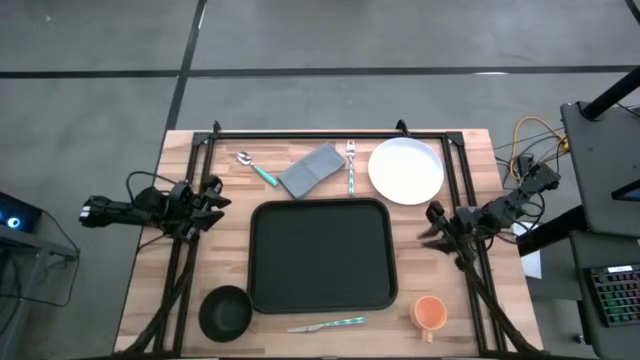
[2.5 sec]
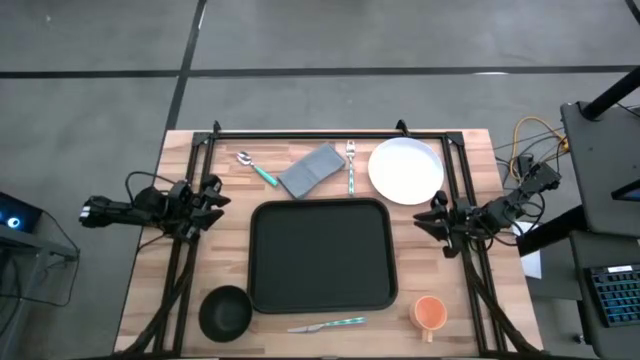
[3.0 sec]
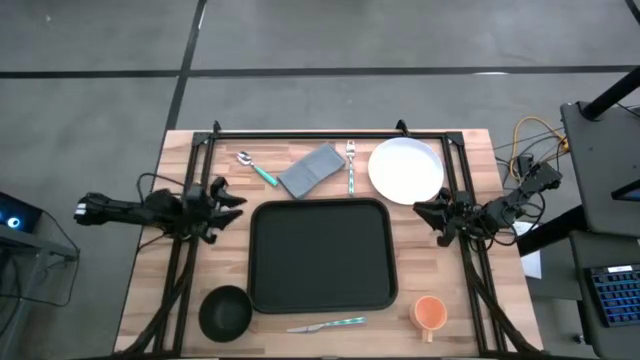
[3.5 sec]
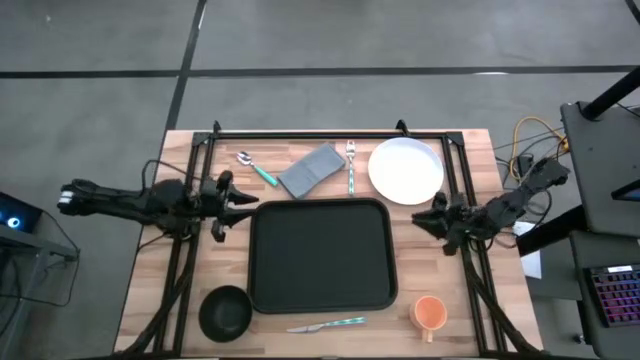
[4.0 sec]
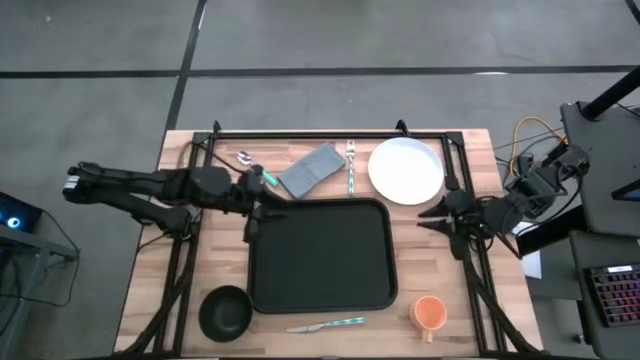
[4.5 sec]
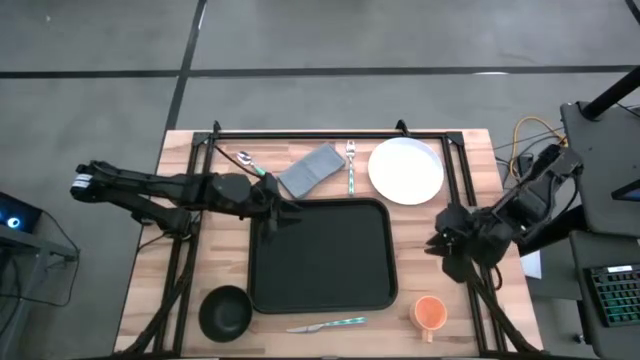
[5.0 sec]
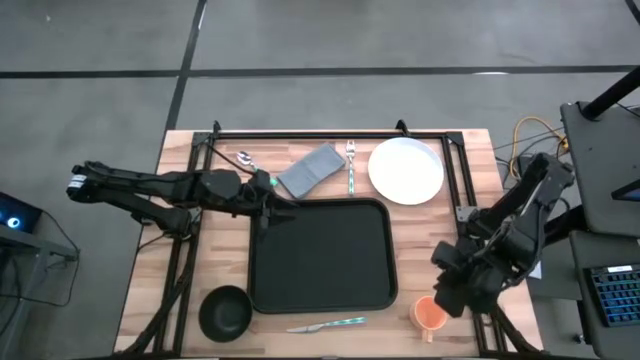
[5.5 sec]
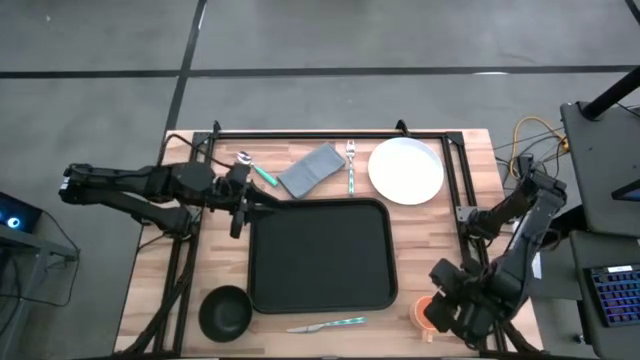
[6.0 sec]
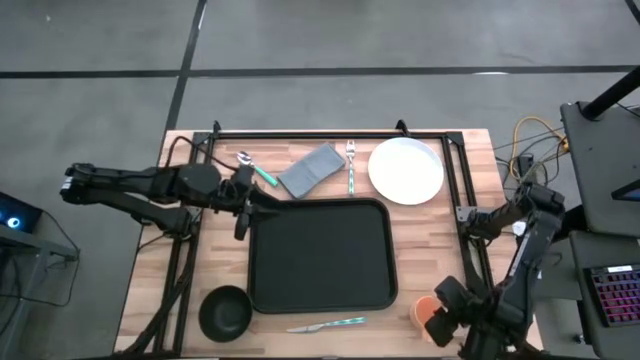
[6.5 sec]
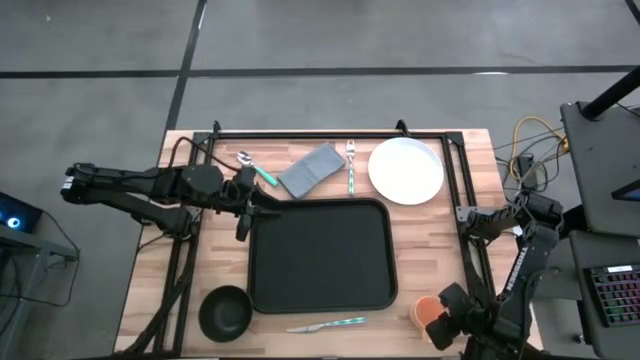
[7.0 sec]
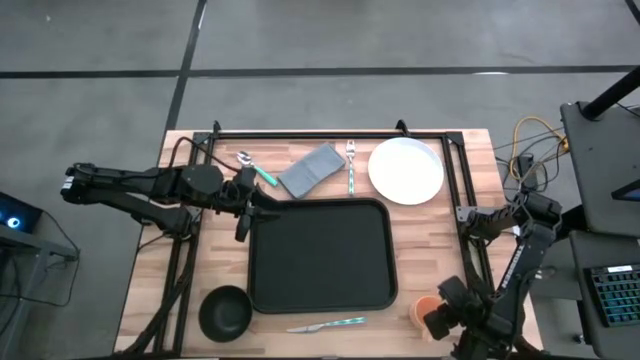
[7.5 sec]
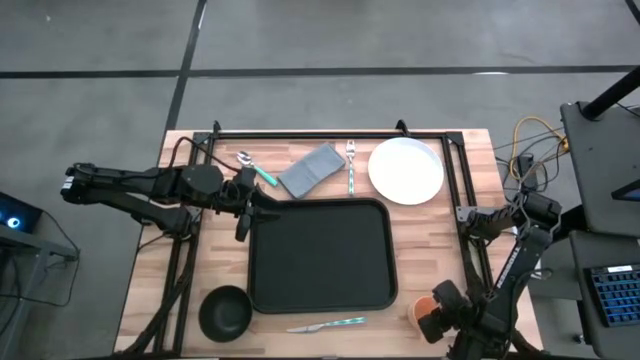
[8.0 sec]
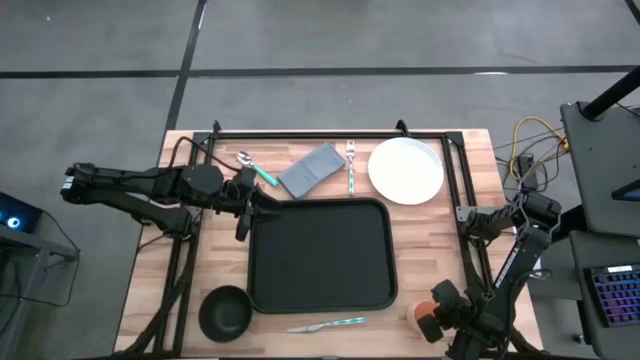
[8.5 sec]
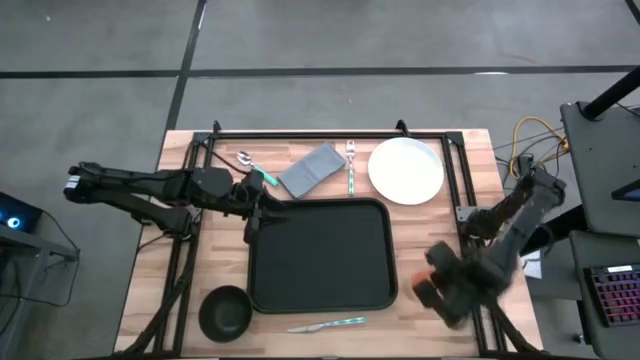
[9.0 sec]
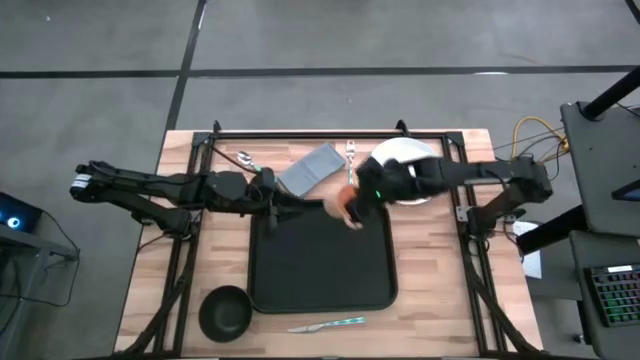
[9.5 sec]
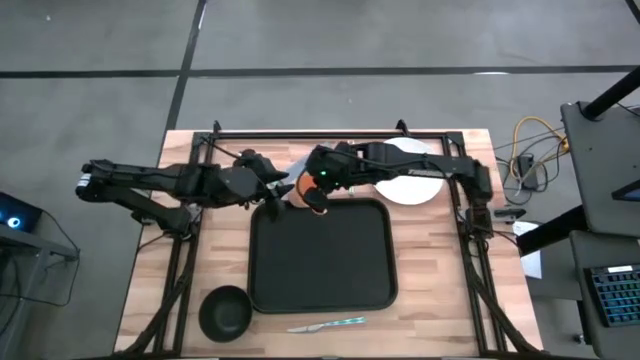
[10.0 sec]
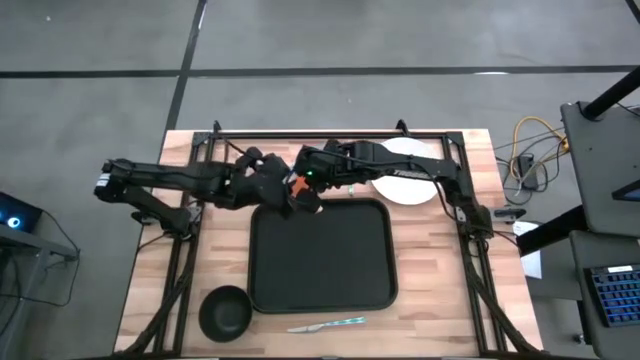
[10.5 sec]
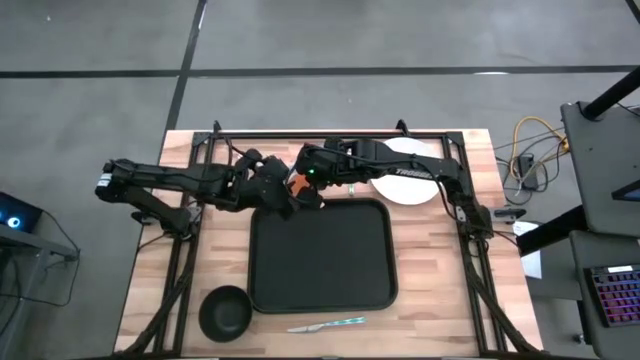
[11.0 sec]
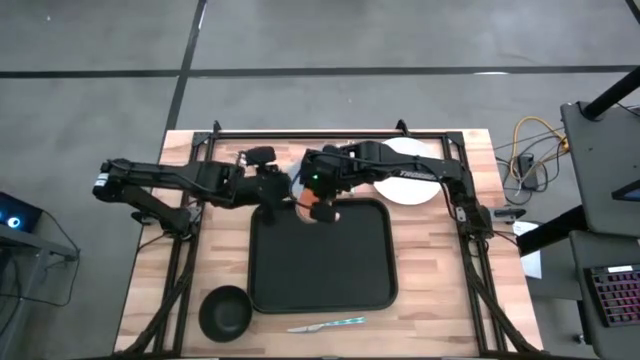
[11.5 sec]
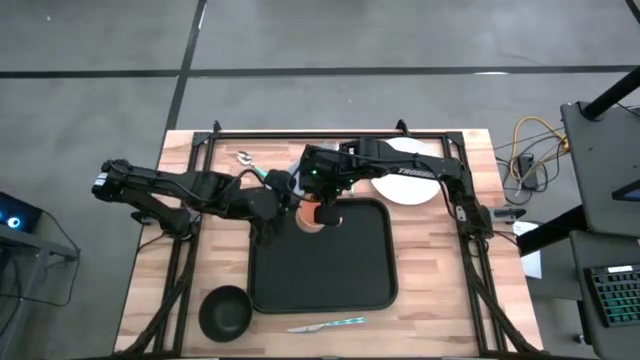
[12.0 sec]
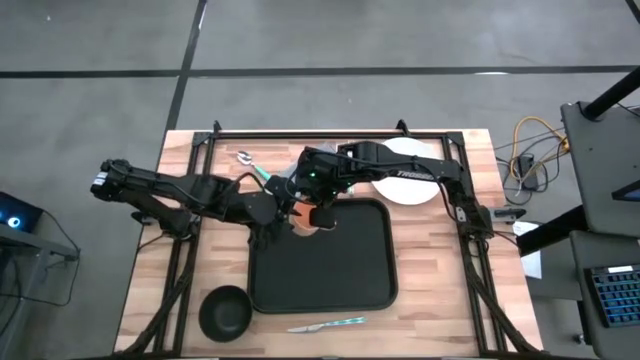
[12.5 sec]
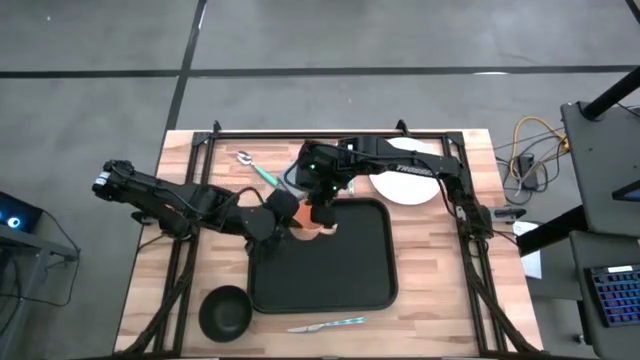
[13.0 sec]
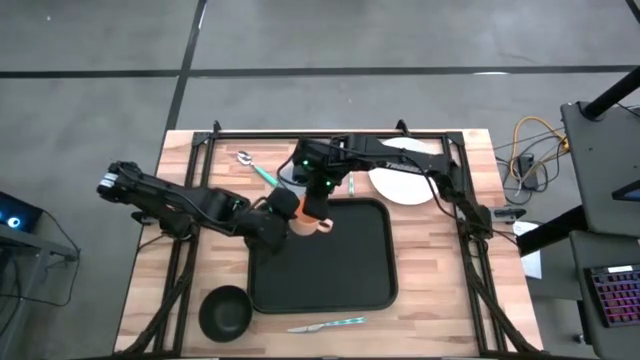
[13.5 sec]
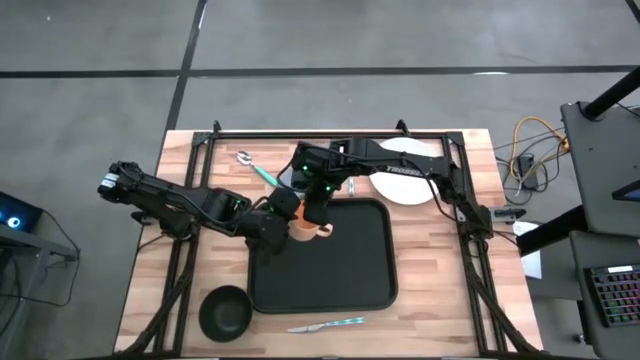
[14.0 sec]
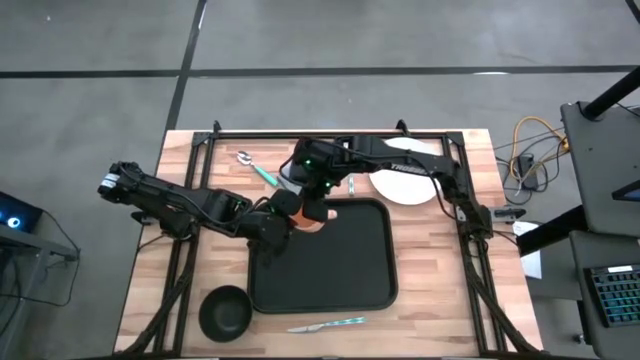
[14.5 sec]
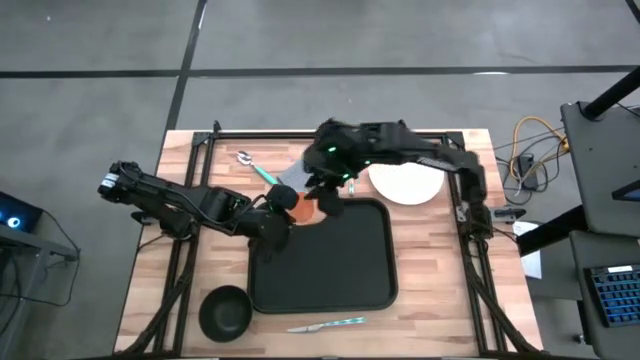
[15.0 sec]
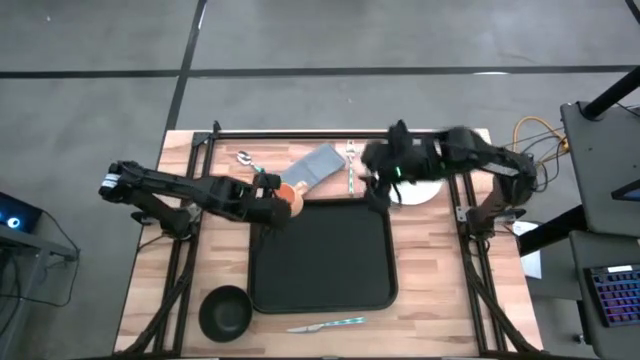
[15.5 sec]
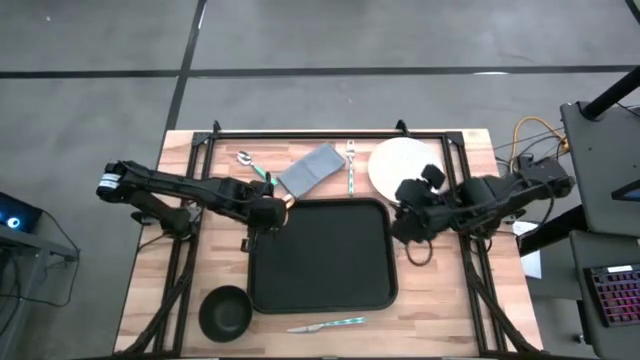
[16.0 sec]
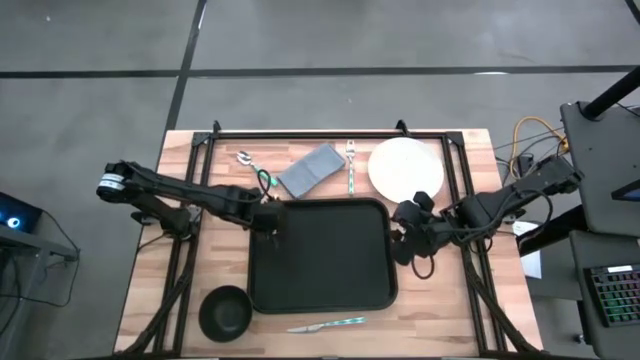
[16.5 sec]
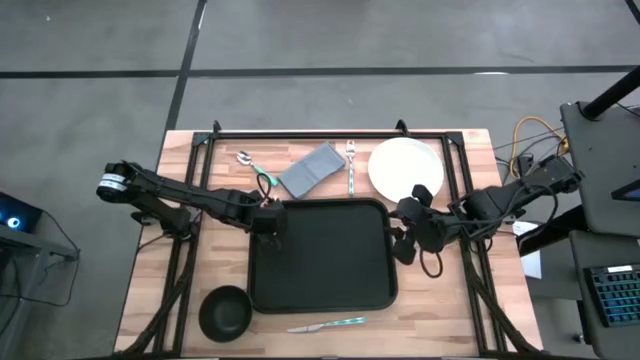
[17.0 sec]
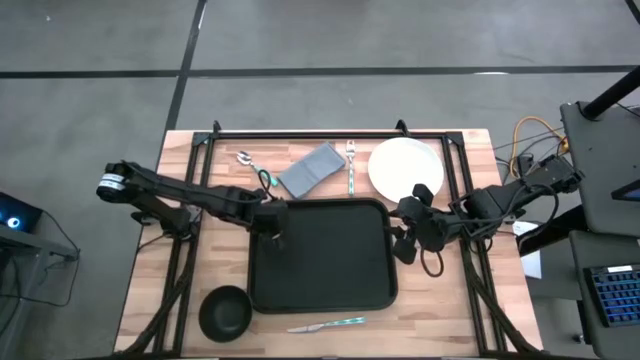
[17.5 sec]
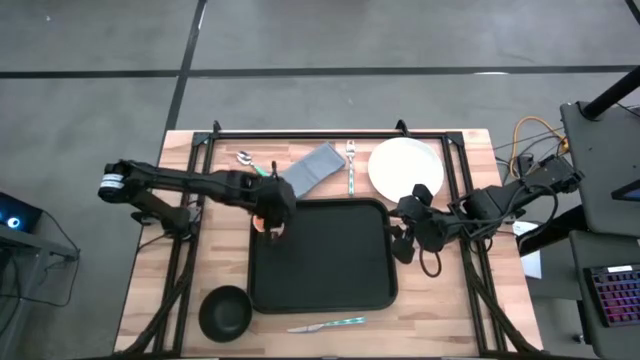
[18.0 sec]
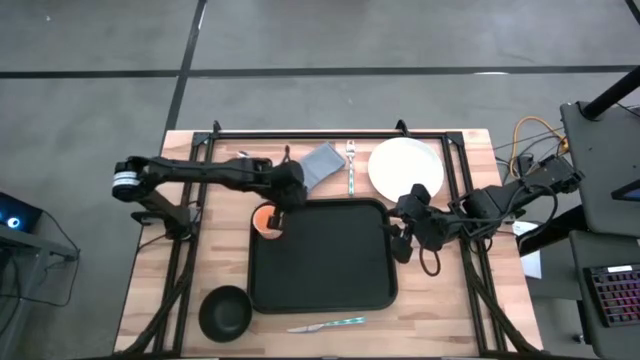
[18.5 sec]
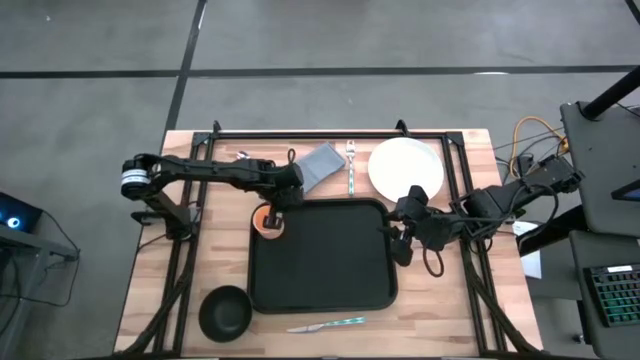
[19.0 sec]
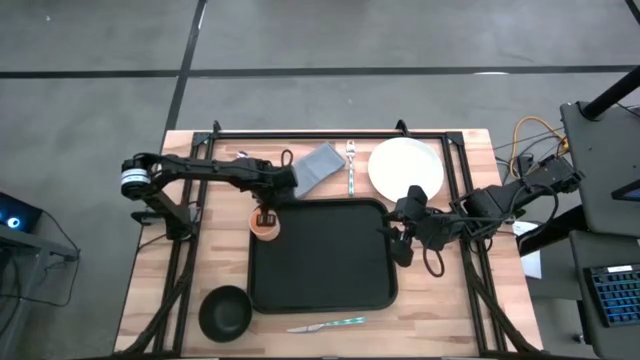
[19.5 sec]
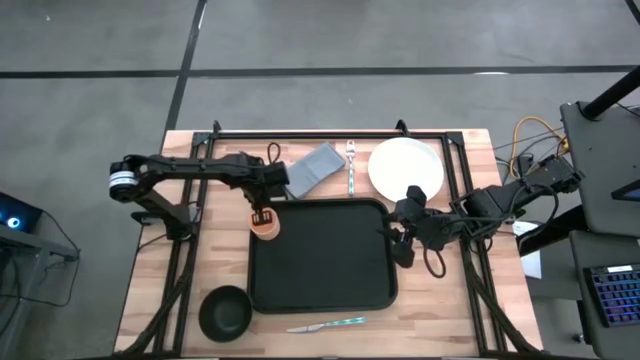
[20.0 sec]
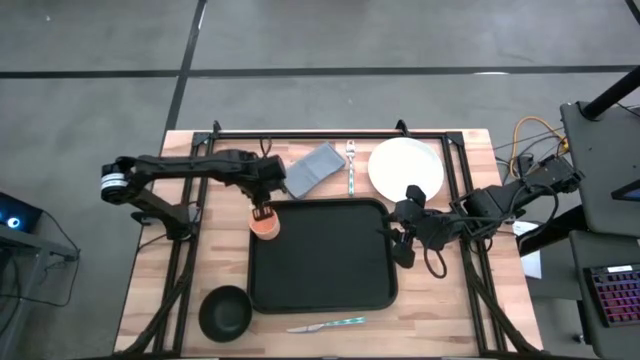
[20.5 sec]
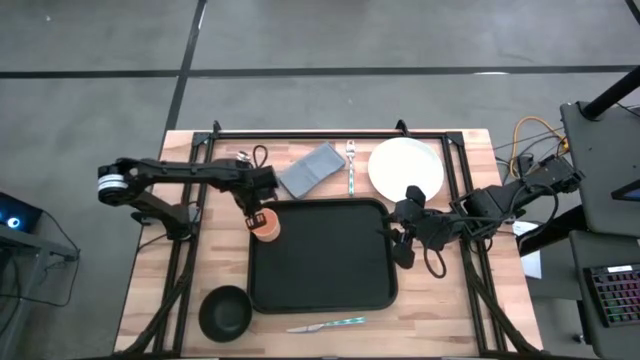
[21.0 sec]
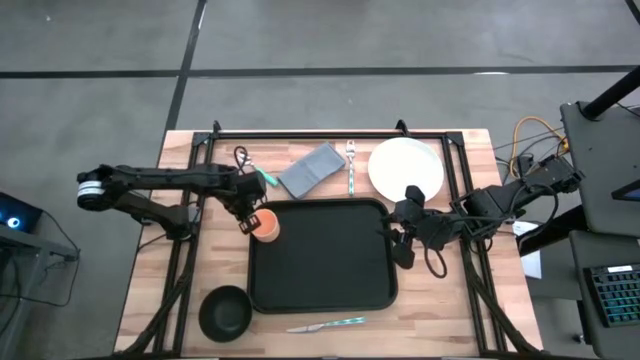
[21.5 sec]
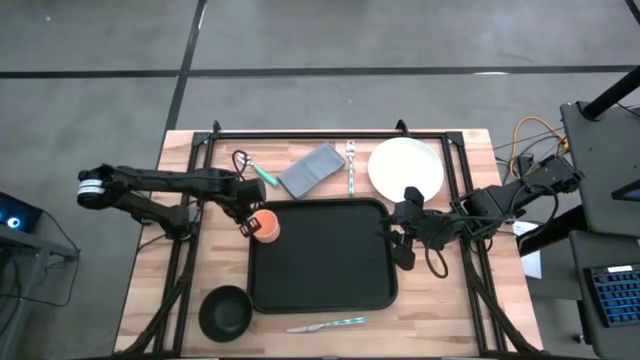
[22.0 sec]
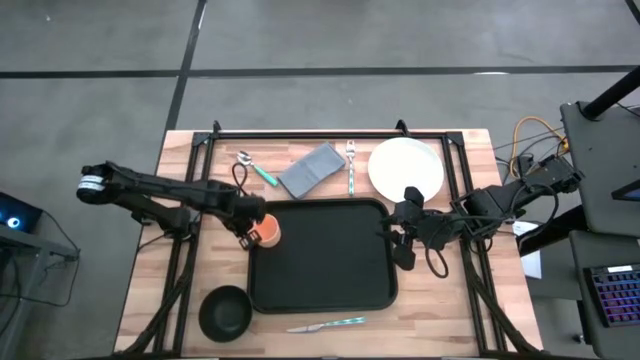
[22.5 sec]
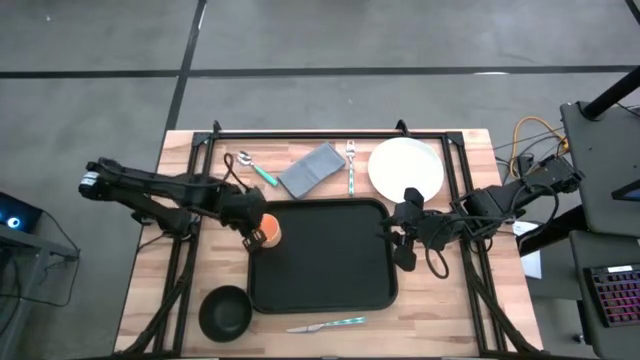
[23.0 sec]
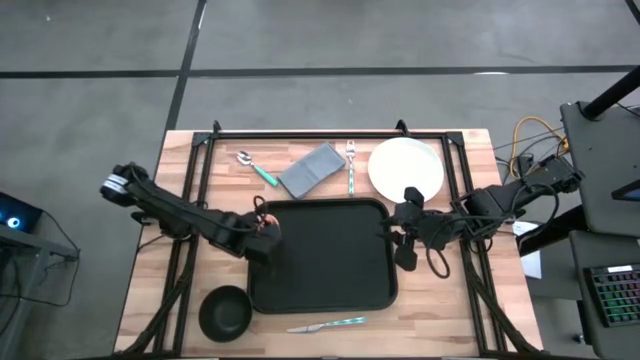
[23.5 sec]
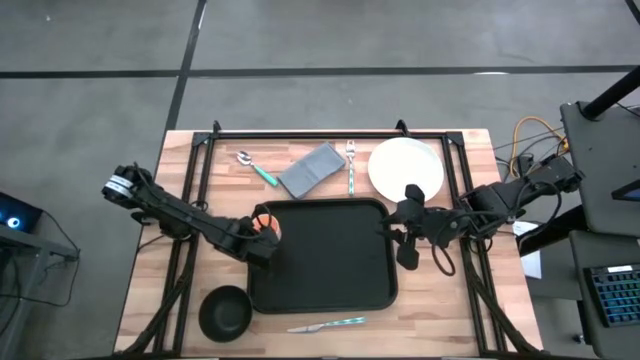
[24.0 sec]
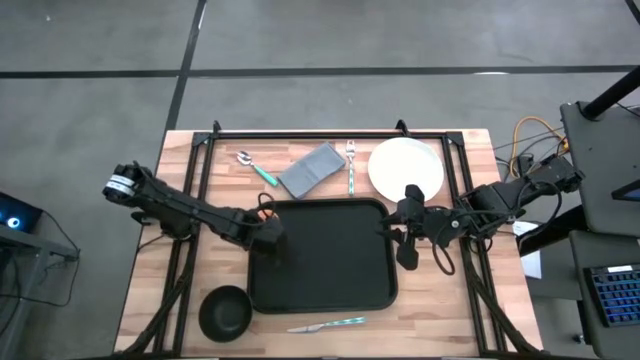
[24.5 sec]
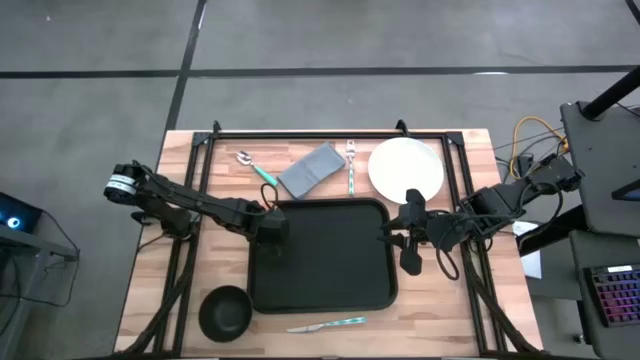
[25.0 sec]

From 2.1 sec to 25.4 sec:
Task: Set up tray
Put the mug on the tray
